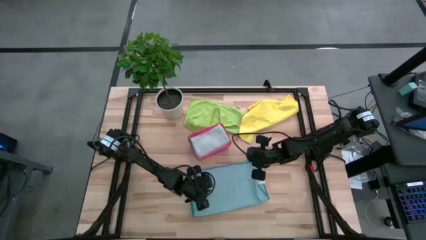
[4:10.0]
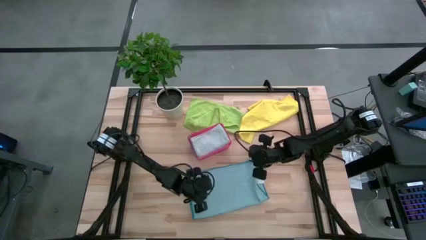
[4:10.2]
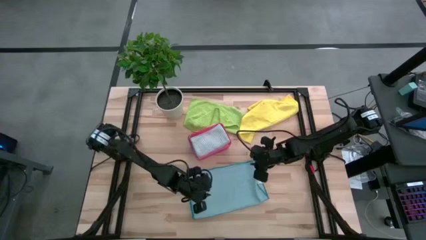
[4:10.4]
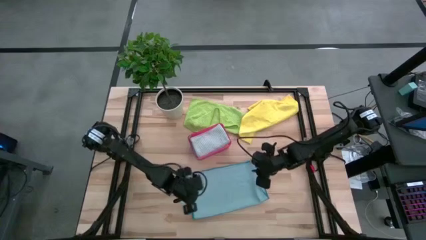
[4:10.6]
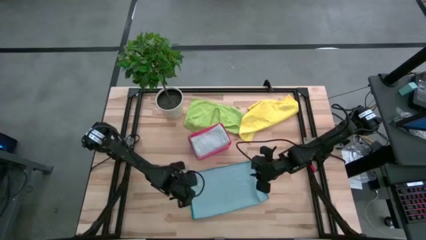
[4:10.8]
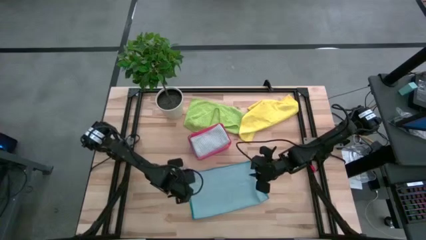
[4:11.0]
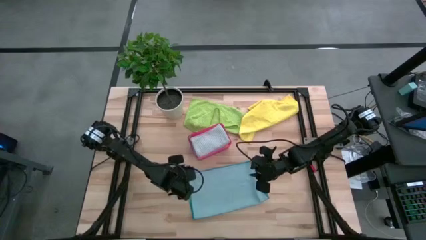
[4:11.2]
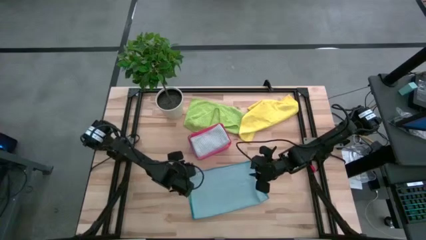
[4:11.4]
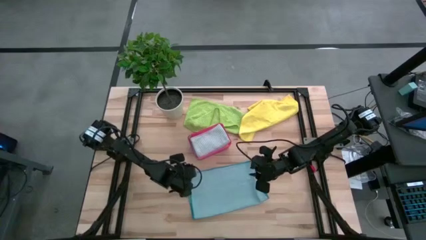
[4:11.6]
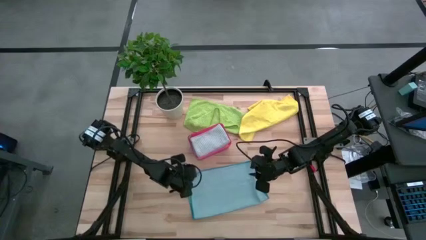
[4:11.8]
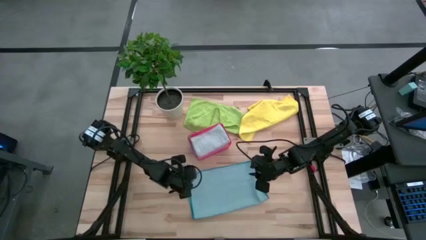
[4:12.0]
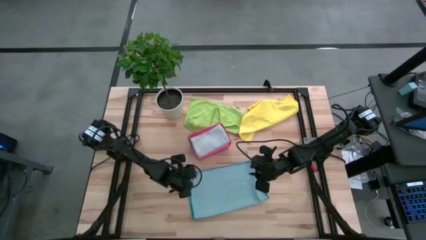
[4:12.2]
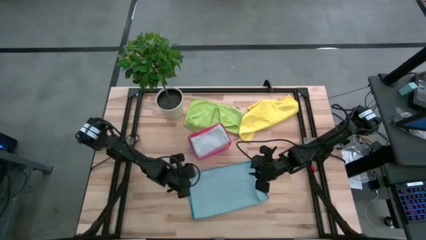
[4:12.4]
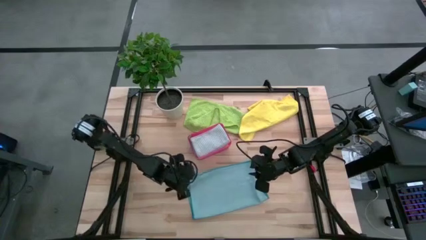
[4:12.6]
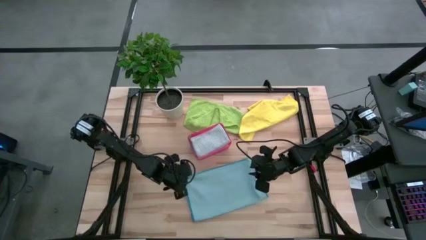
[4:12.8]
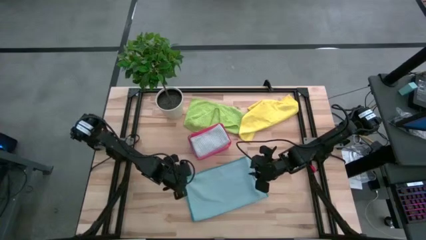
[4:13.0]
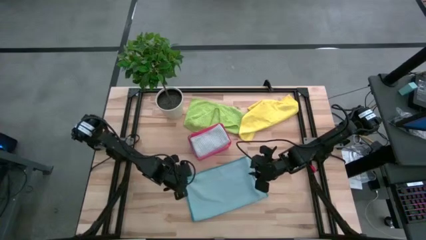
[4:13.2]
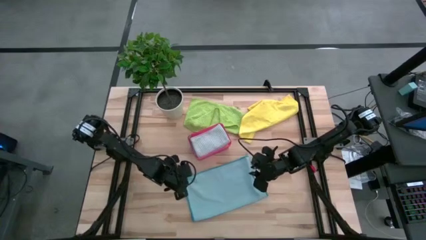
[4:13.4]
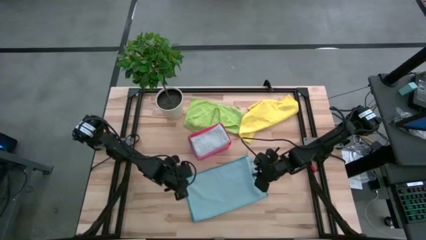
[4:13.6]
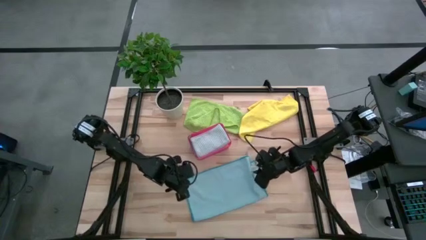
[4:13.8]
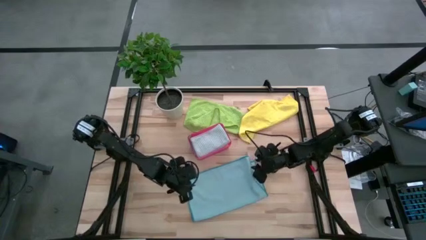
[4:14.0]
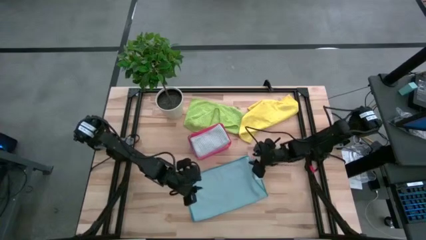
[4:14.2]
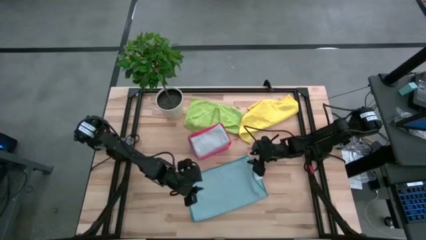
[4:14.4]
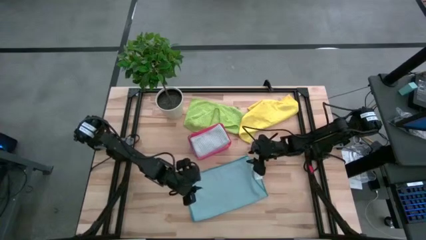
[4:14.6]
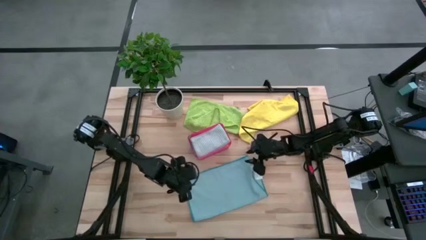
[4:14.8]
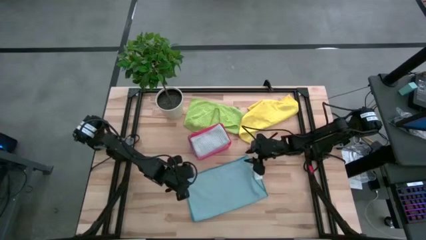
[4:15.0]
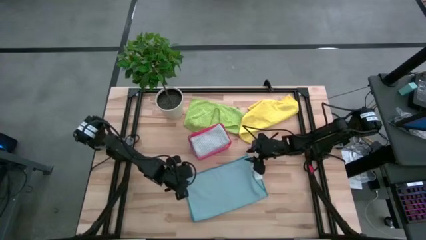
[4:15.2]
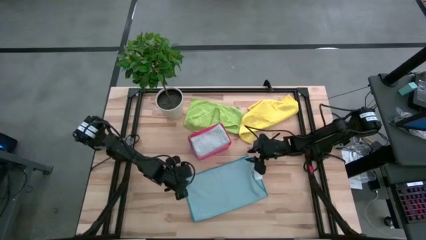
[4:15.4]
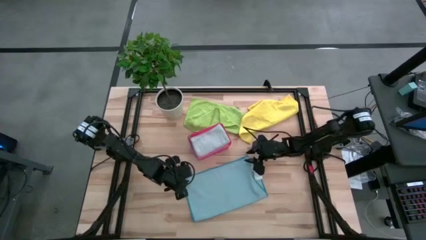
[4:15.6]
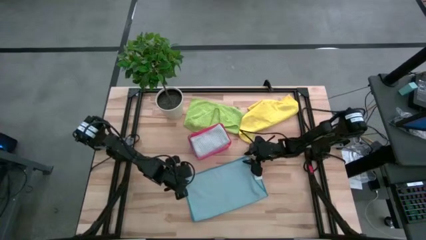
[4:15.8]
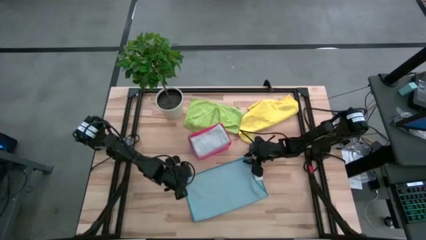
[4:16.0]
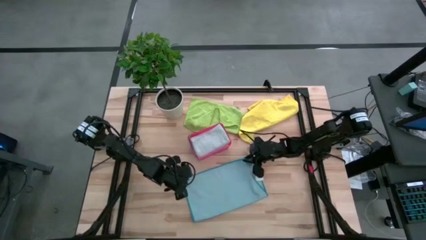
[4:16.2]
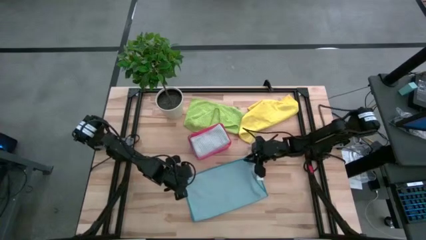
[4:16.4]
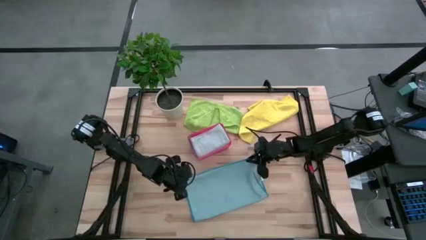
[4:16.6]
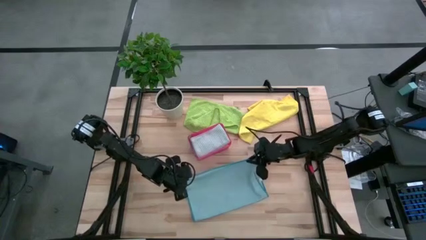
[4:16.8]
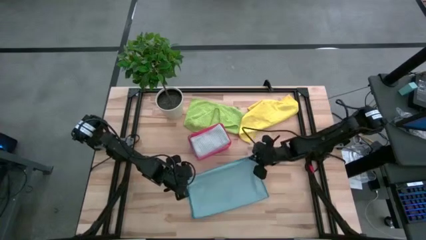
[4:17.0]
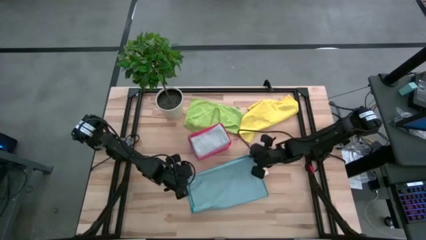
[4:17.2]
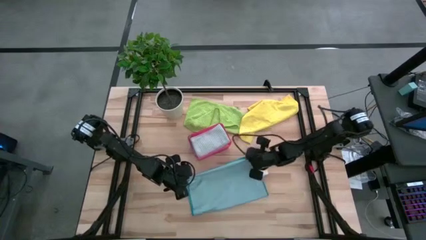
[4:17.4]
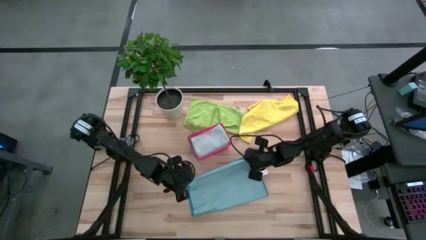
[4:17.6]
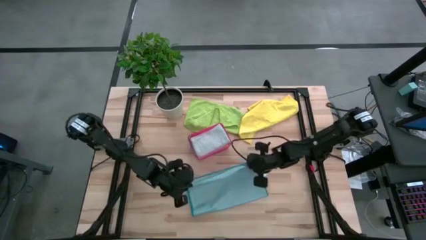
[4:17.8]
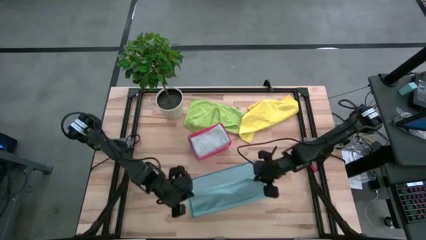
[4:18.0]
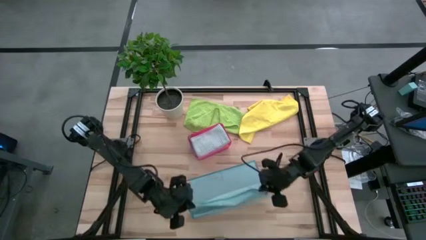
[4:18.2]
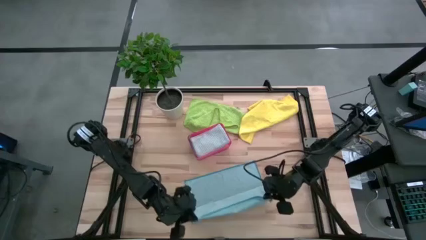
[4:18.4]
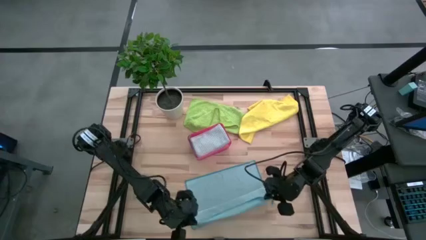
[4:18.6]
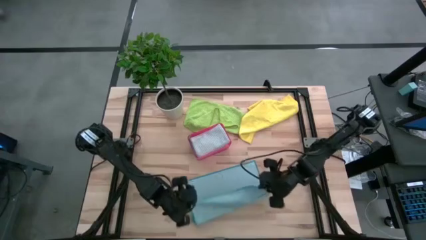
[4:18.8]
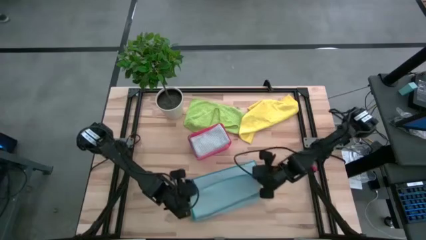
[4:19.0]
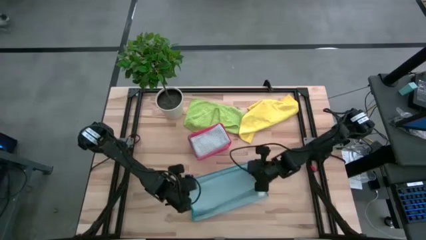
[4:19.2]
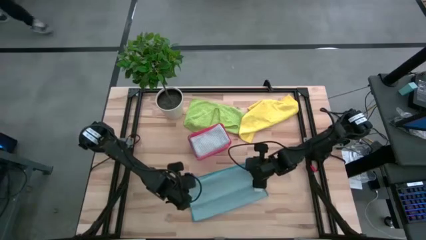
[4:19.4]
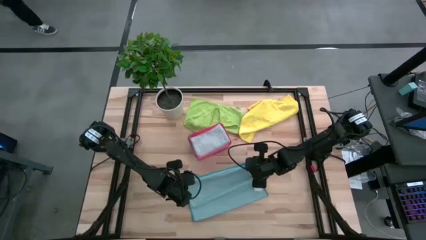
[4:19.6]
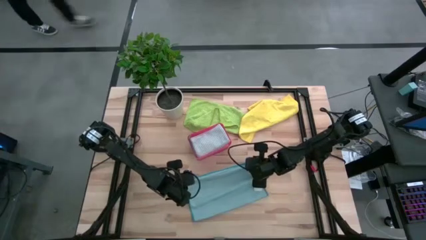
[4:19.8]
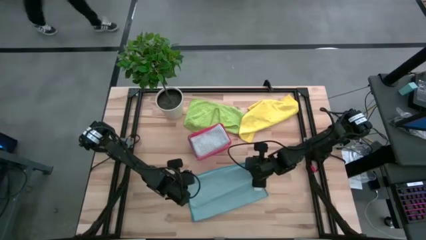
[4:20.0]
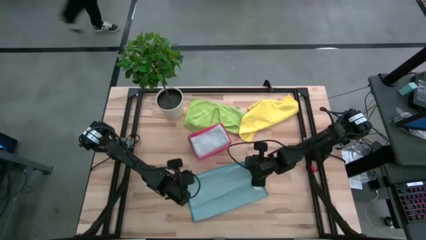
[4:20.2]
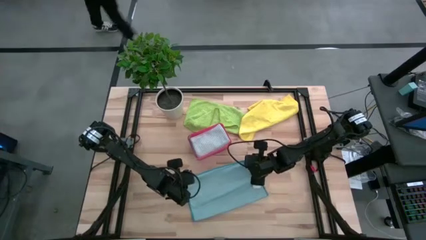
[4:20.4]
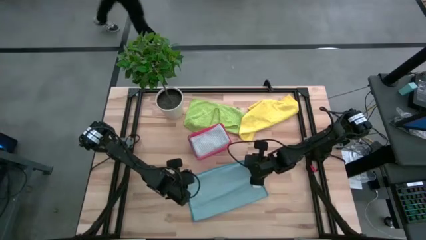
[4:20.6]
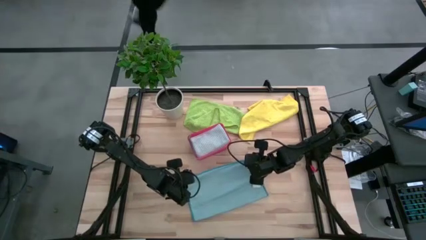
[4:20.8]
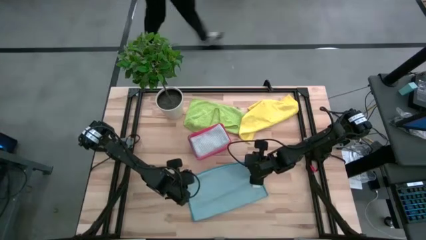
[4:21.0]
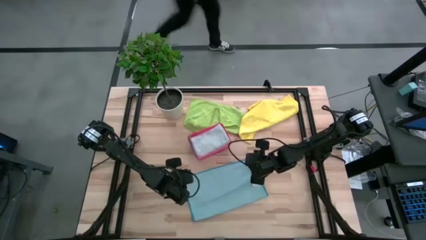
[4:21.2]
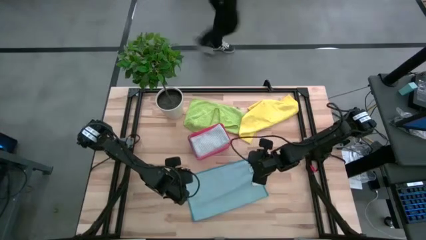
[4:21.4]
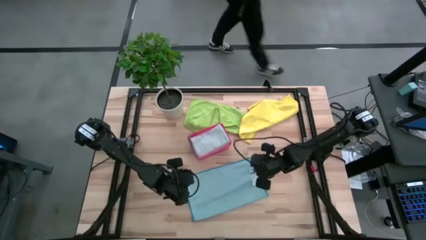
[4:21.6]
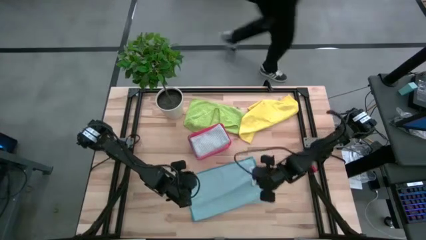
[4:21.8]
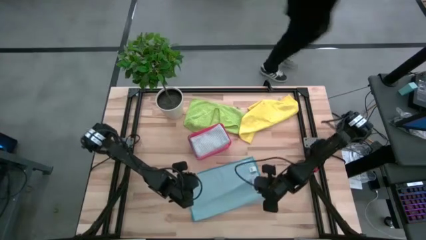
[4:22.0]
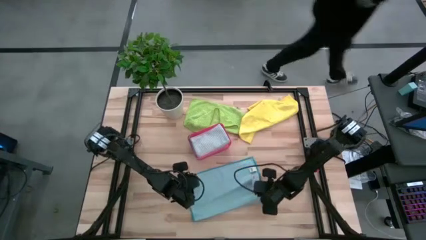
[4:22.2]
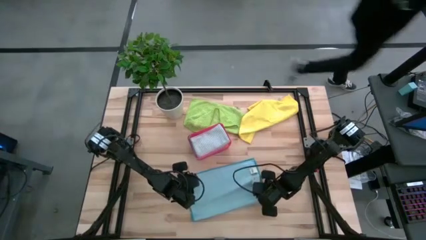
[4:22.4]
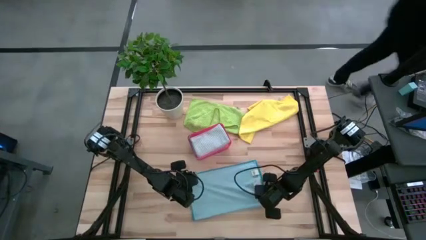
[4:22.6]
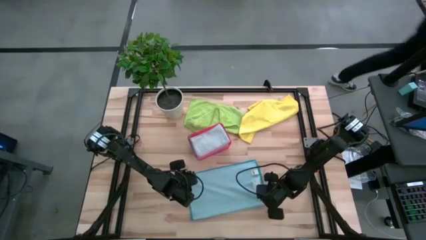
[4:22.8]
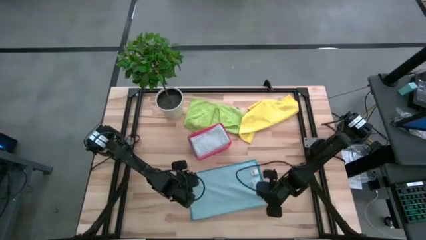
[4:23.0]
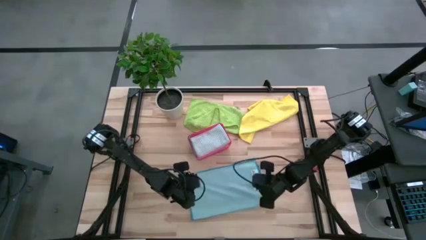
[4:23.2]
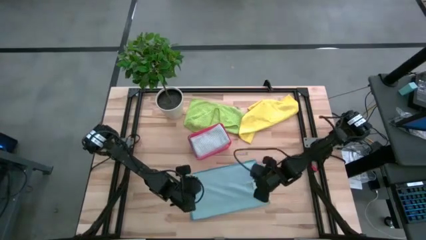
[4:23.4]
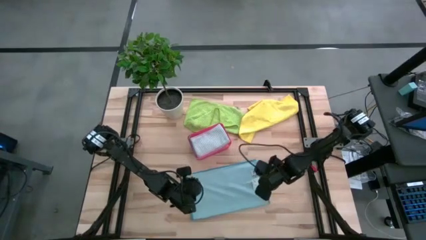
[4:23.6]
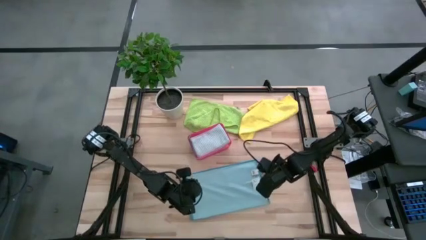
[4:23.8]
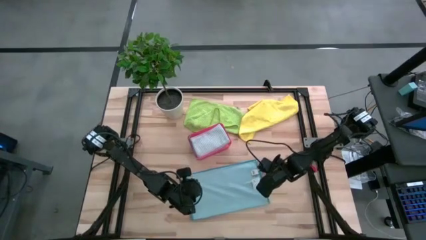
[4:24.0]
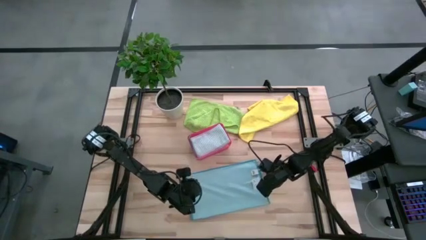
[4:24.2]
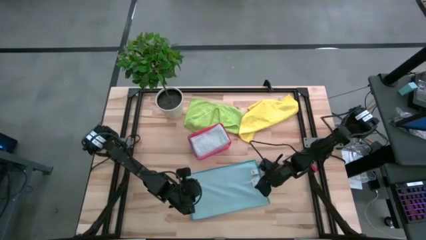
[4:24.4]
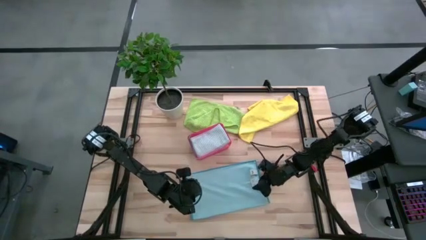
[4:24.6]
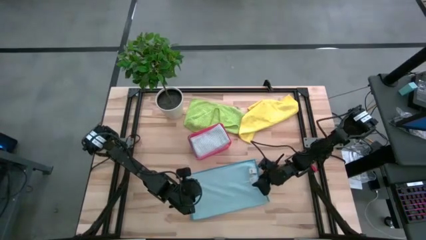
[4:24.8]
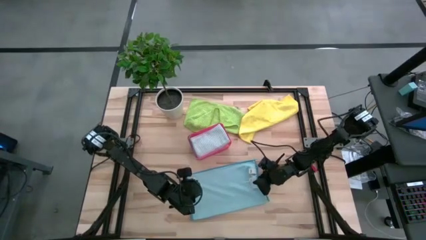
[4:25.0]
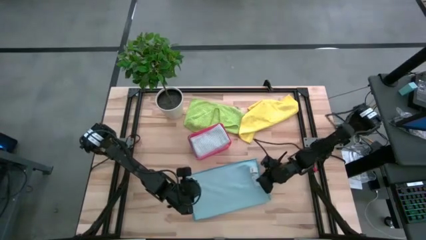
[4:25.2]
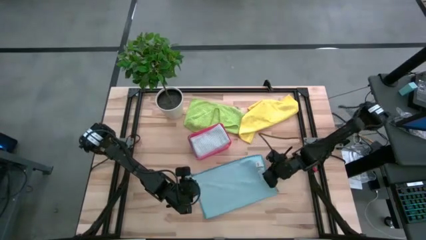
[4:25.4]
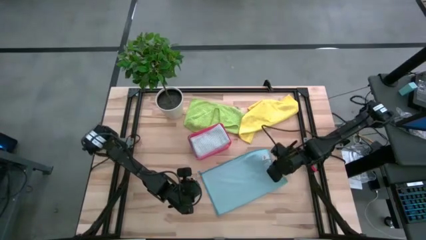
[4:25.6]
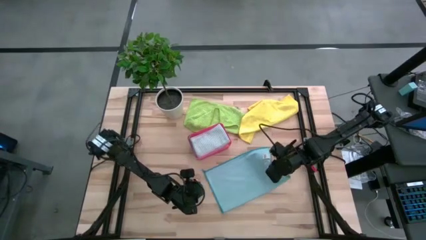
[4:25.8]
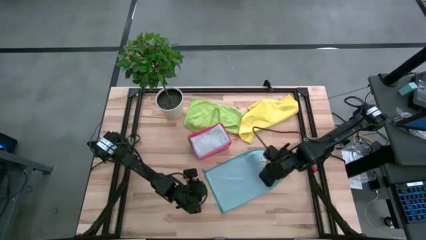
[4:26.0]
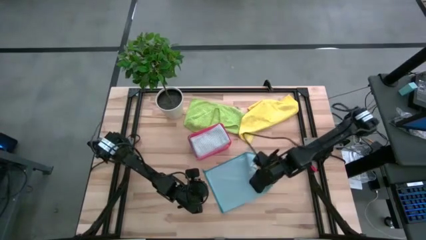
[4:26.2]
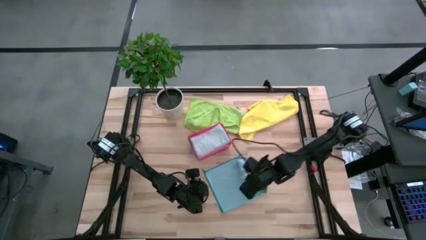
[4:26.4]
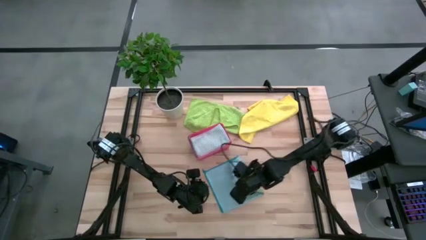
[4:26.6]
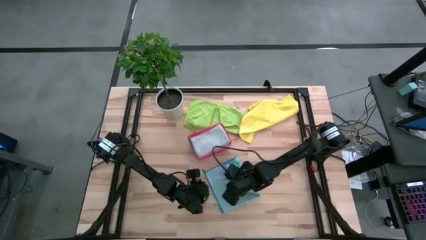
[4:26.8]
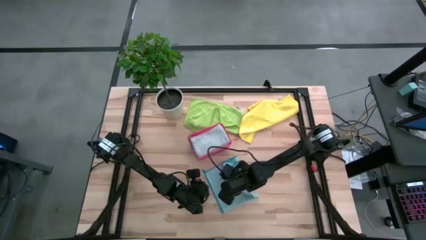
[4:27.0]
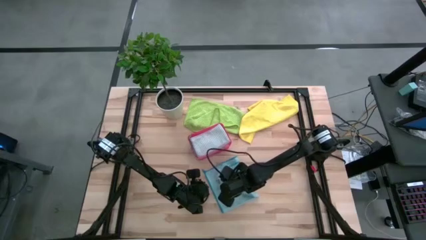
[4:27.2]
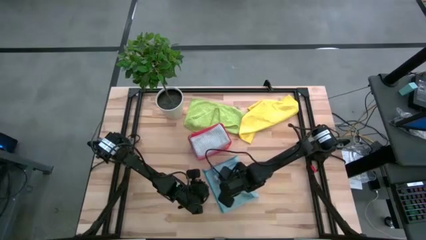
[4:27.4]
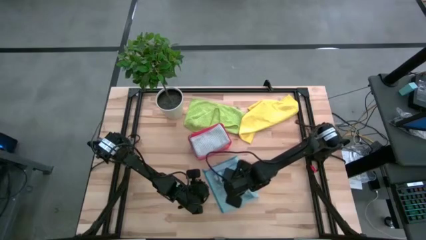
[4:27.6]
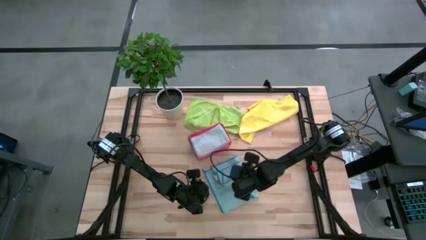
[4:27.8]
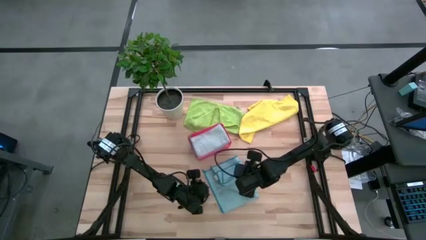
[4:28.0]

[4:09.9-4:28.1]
Task: Fold microfiber towels
Fold the blue microfiber cloth
